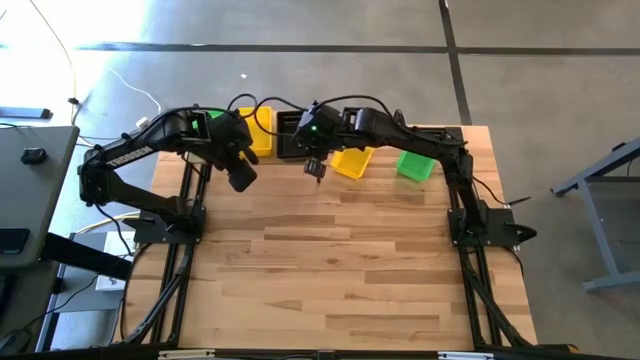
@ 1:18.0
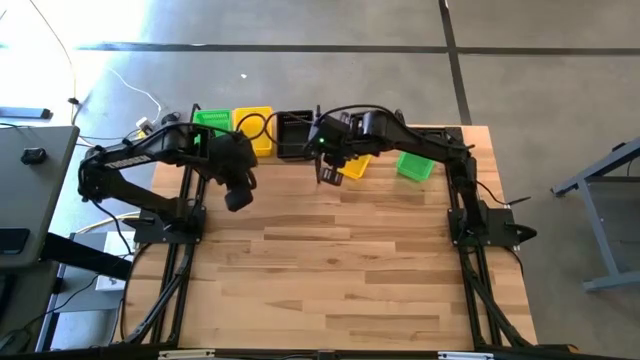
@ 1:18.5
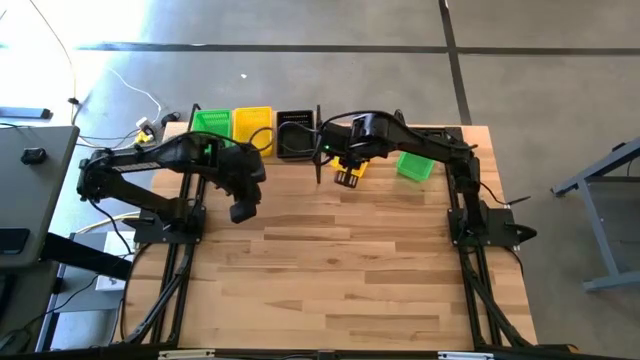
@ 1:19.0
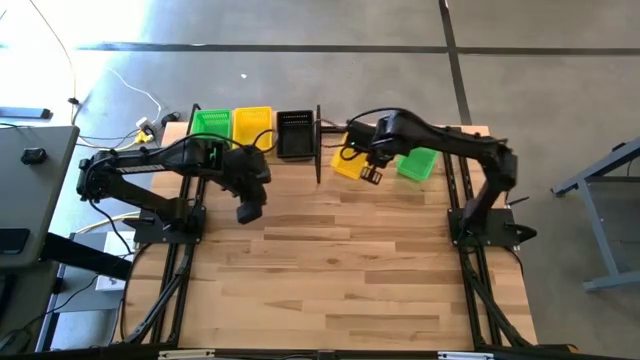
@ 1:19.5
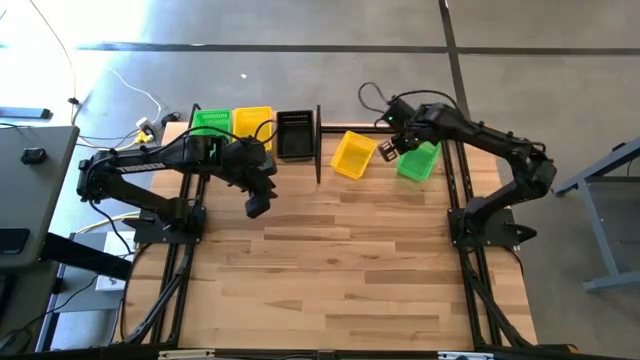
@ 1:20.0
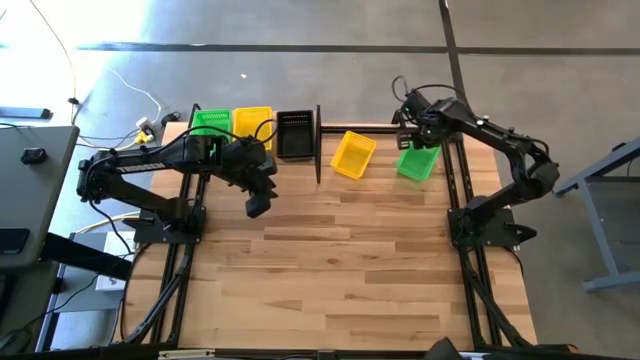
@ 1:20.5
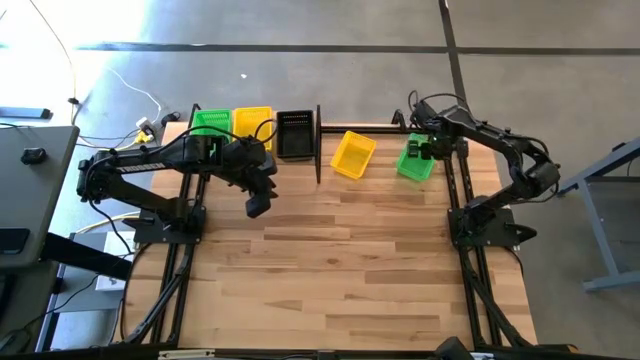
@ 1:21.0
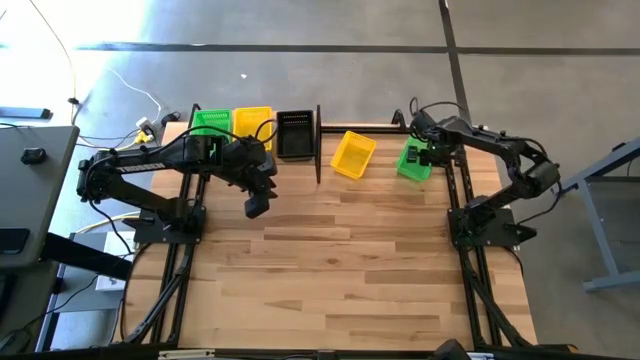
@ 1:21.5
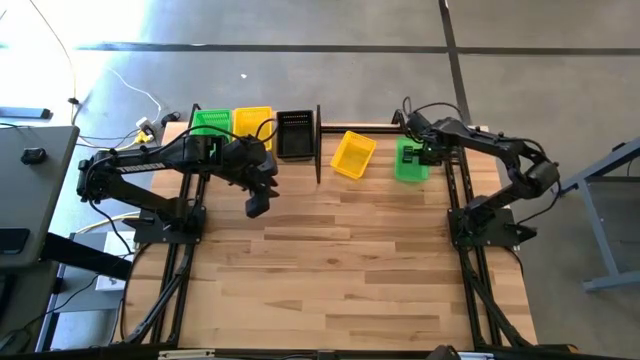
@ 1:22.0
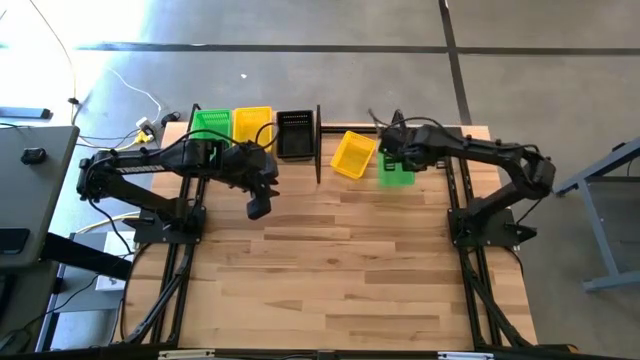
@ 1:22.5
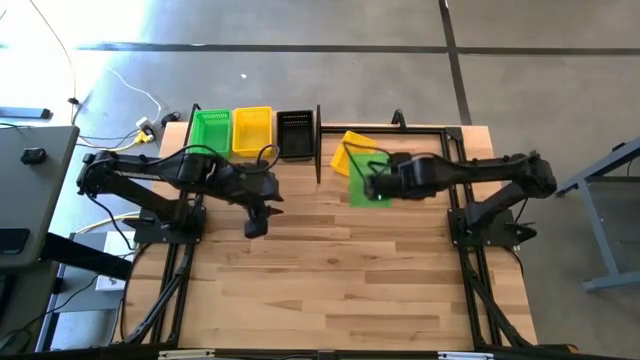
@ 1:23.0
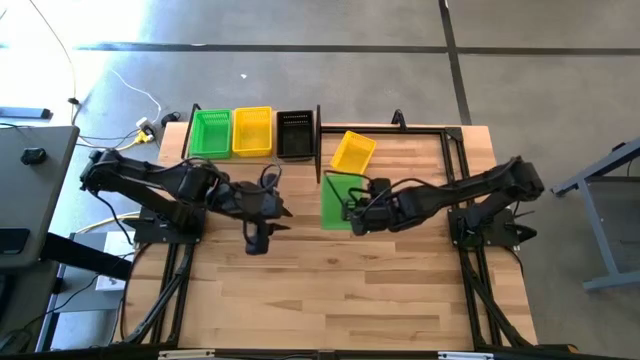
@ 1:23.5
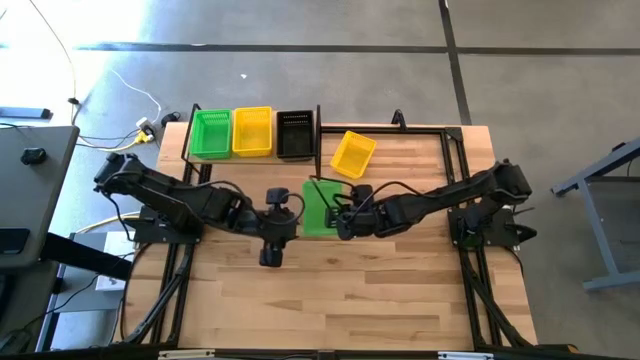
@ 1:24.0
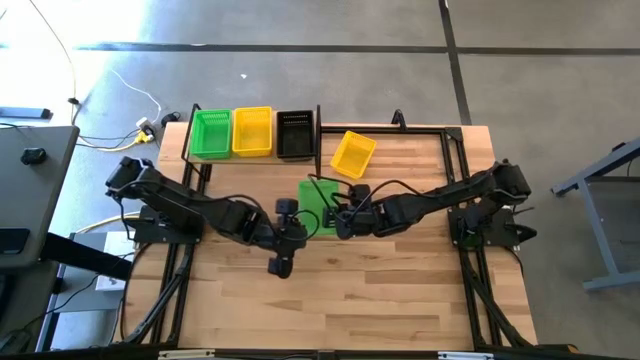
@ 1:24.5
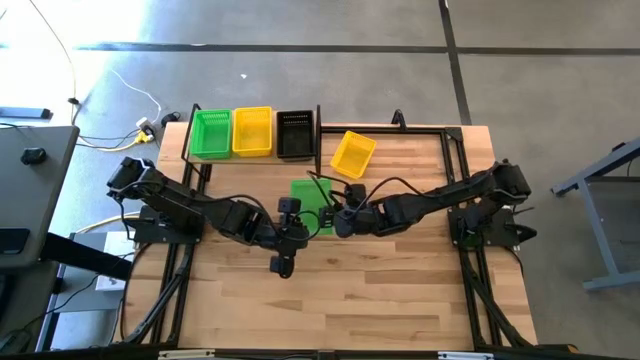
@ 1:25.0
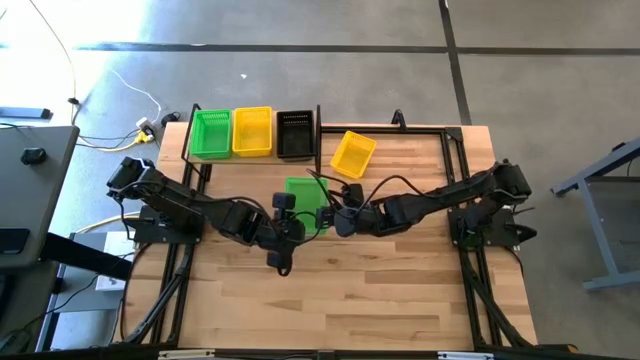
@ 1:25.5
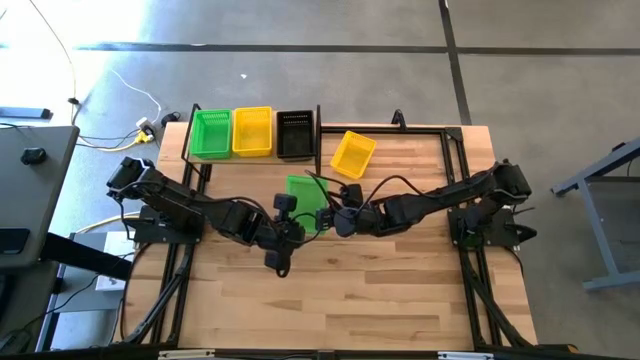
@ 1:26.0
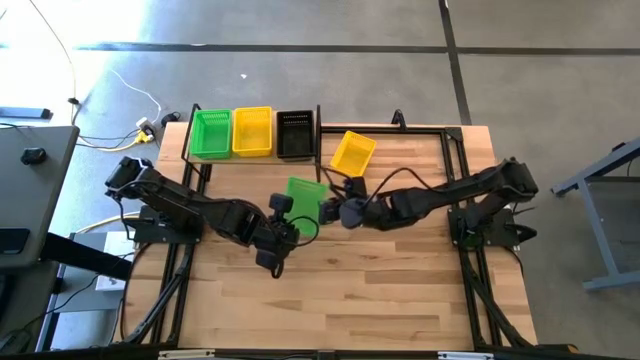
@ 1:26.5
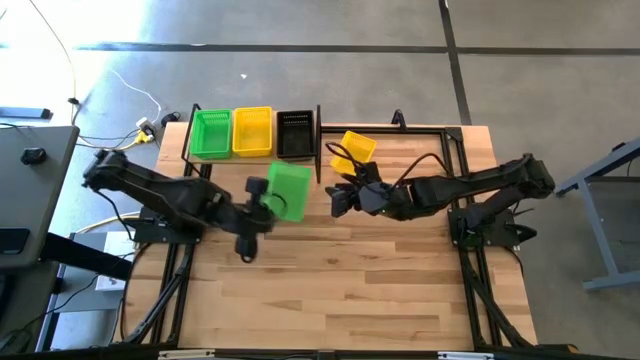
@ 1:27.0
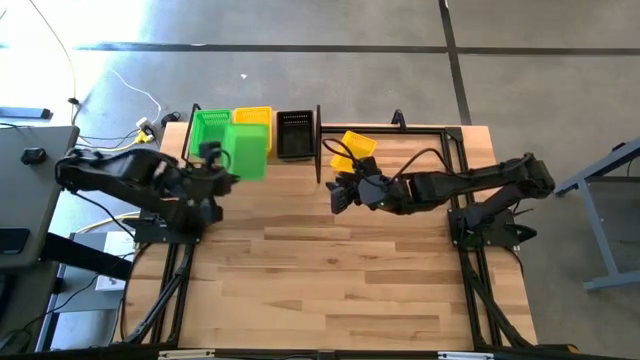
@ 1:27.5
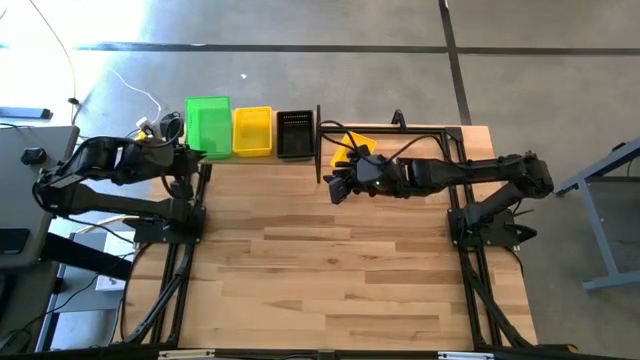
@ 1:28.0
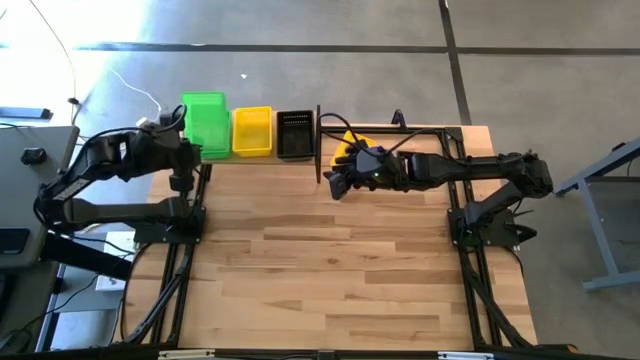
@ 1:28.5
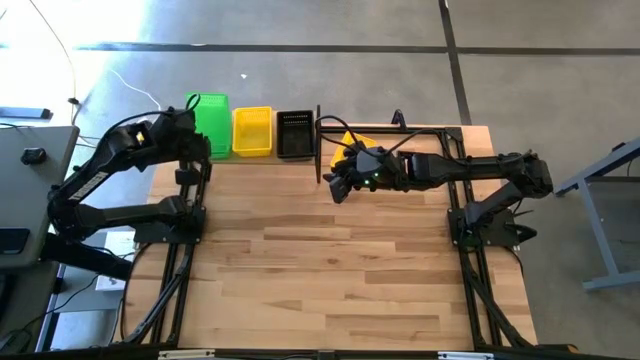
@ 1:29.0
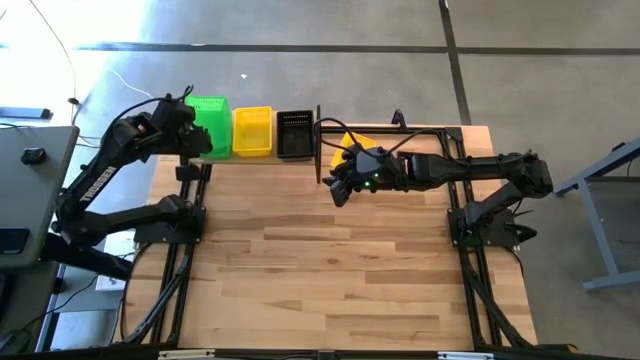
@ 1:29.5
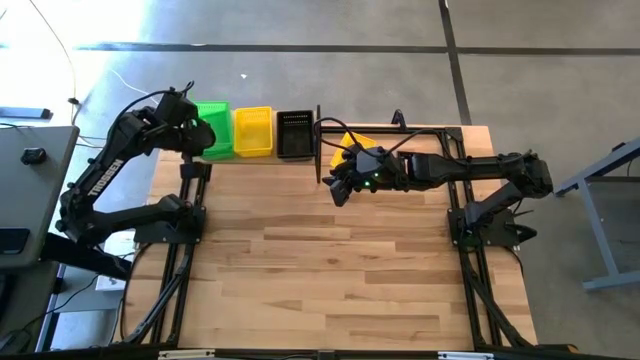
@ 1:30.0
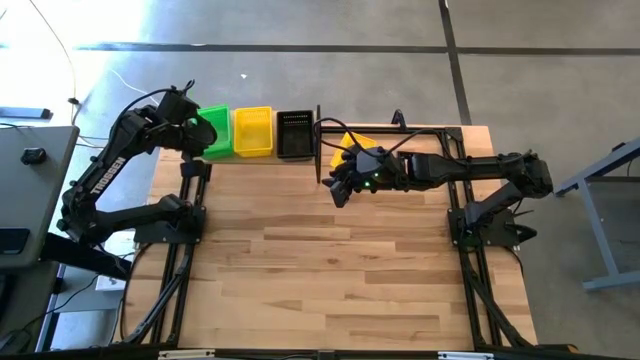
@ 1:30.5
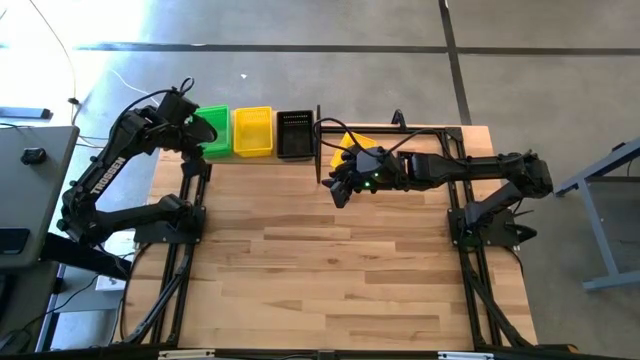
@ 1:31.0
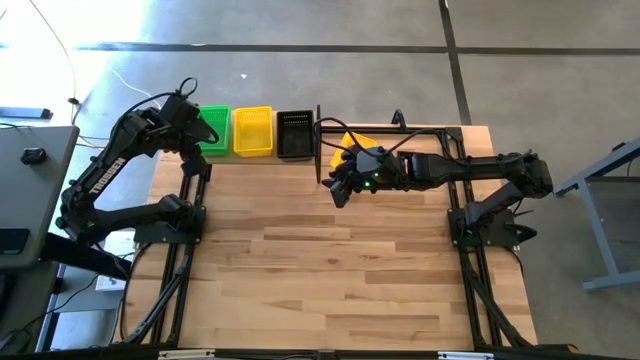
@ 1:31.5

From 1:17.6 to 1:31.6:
Task: Stack baskets on shelf by color
Stack the green bin on top of the green bin on the shelf

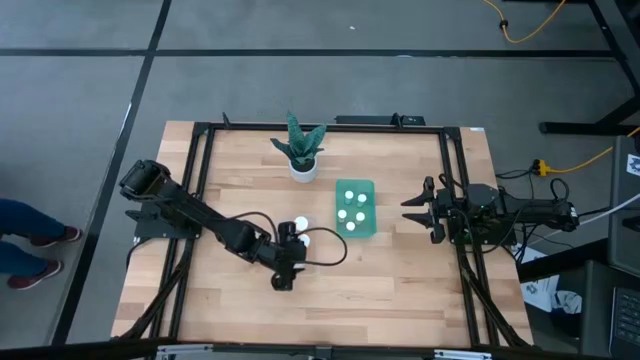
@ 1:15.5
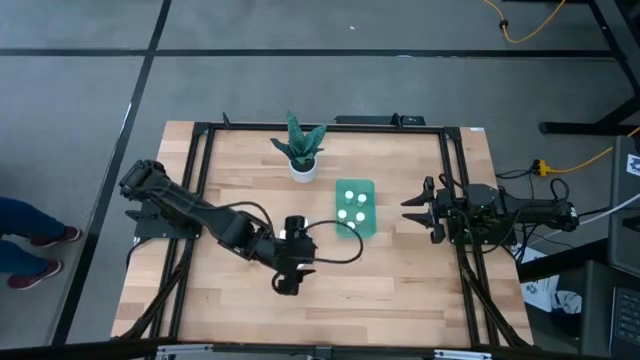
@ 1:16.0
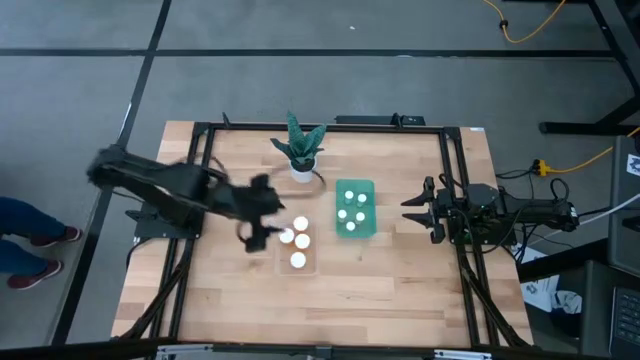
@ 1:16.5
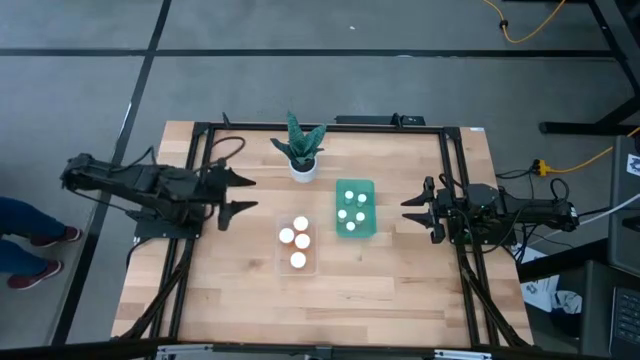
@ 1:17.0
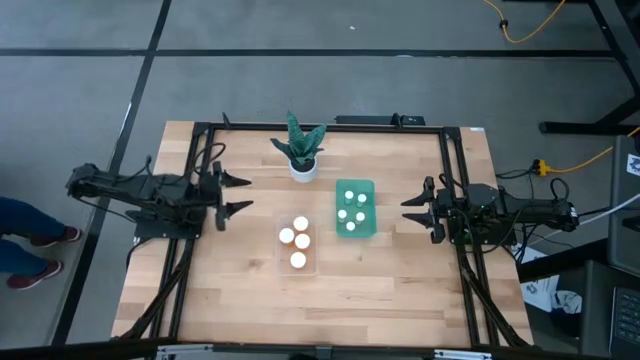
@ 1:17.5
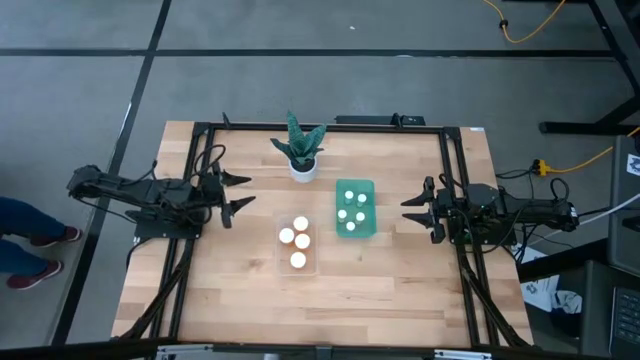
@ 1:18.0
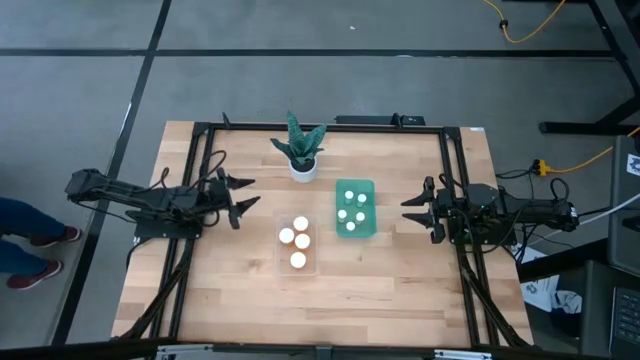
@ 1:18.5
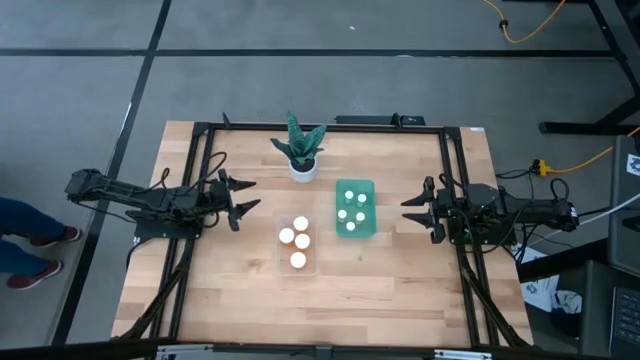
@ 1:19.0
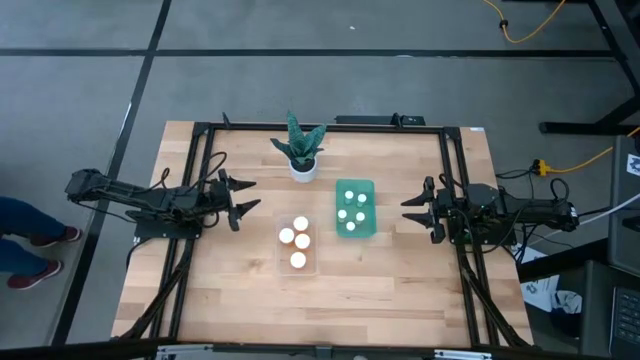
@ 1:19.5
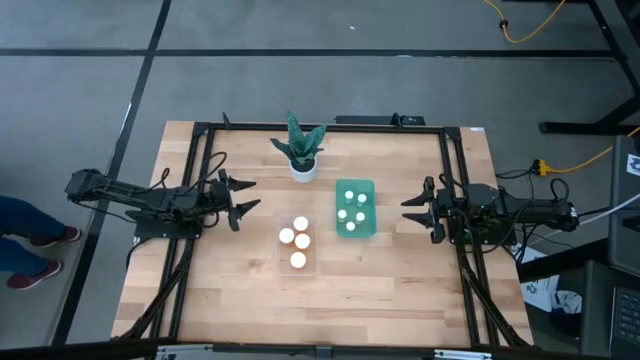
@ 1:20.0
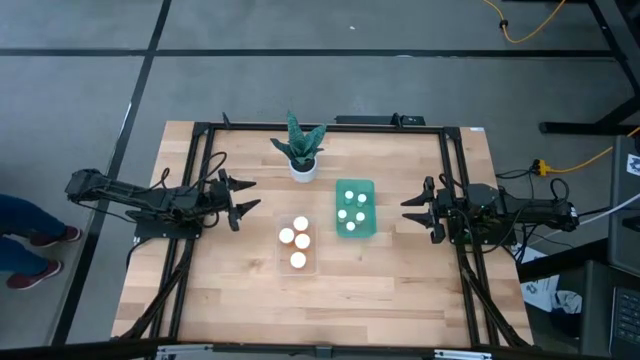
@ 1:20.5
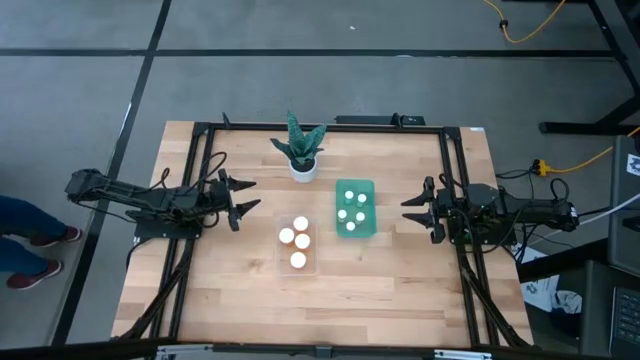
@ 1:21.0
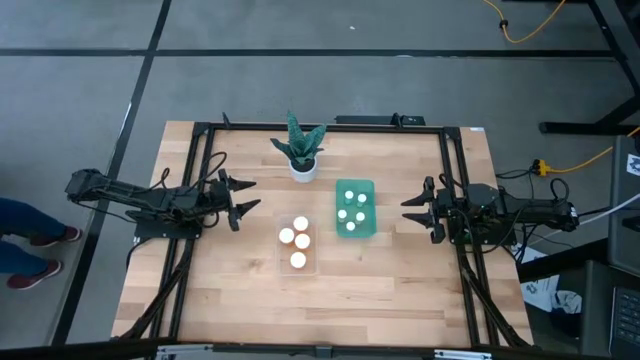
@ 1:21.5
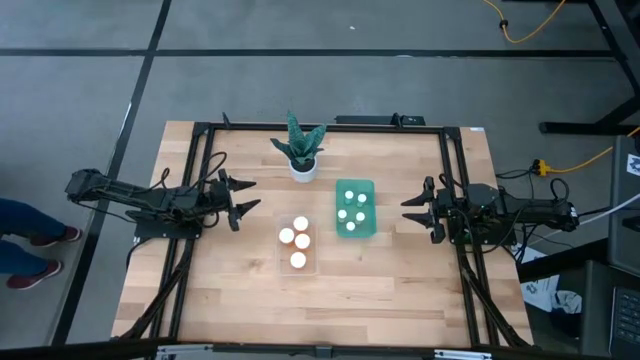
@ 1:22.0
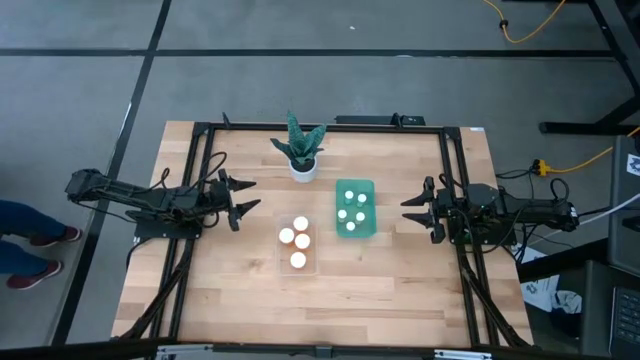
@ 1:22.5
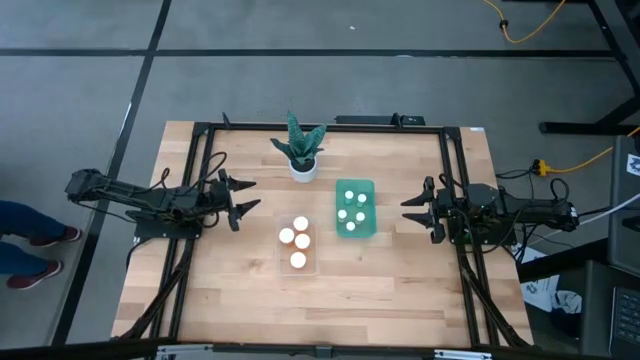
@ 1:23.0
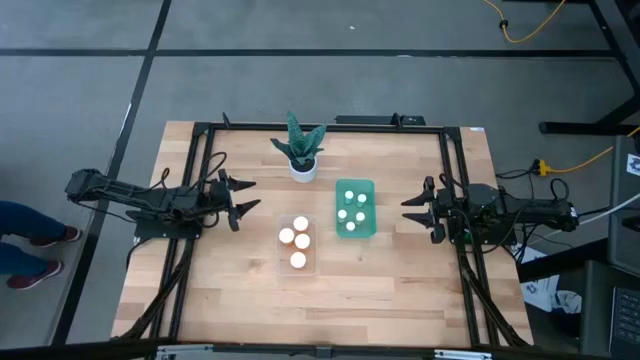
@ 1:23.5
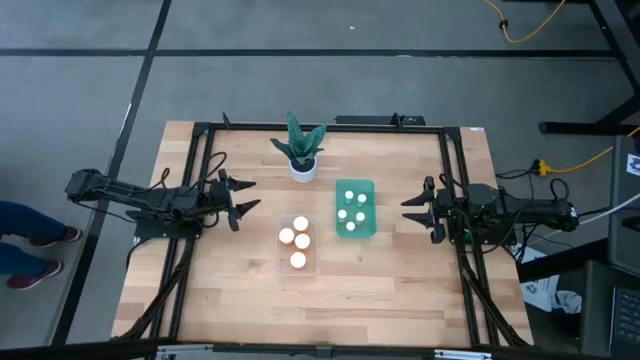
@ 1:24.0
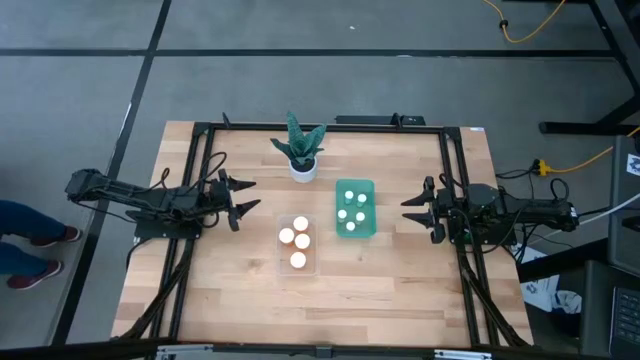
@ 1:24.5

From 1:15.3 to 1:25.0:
Task: Pick and place medicine bottles into bin by pill shape (circle, oval)
Return to Home Position
